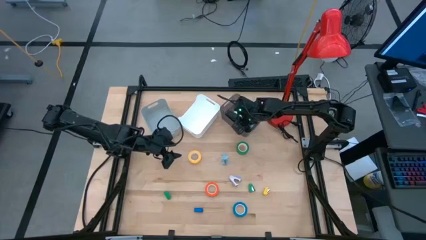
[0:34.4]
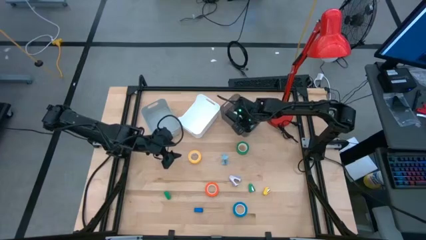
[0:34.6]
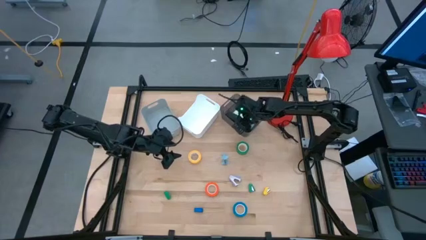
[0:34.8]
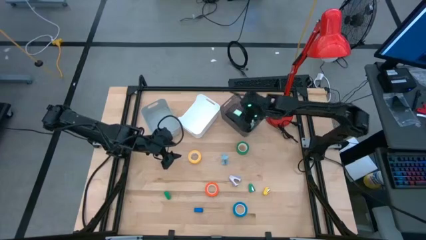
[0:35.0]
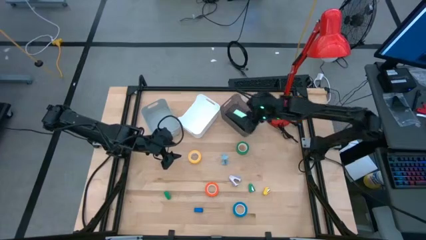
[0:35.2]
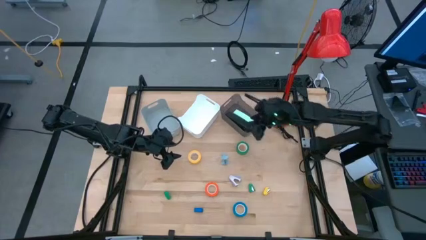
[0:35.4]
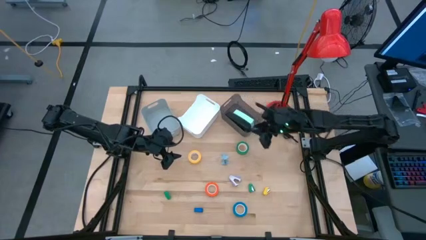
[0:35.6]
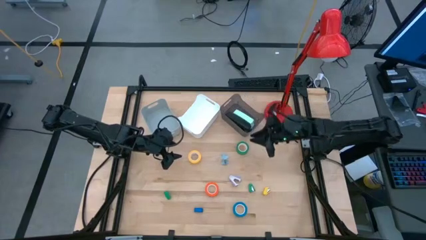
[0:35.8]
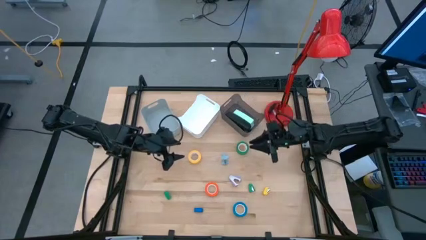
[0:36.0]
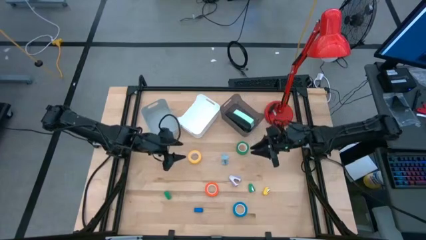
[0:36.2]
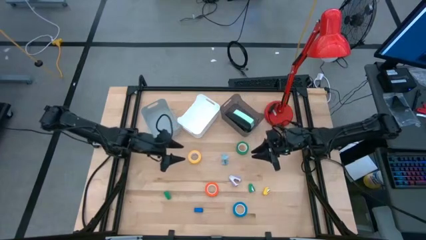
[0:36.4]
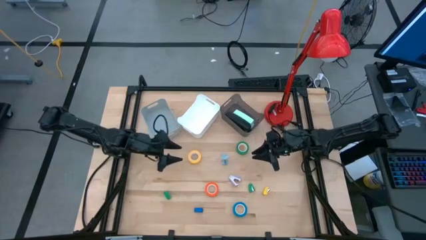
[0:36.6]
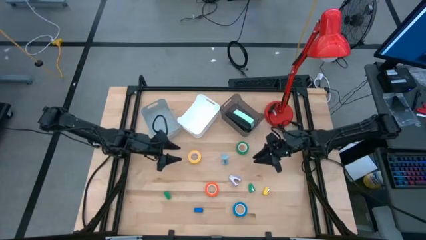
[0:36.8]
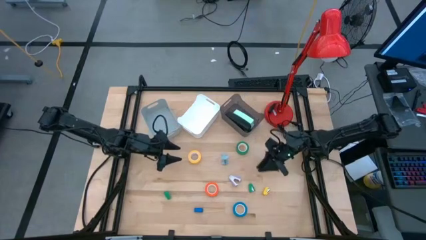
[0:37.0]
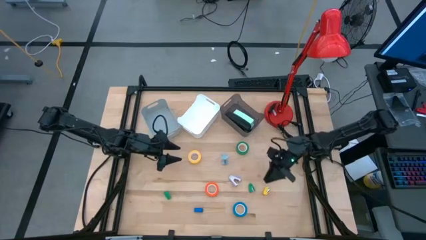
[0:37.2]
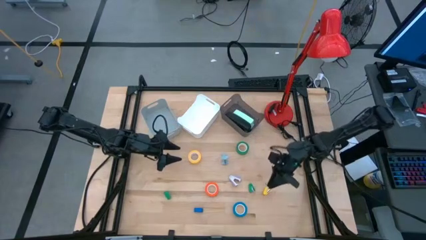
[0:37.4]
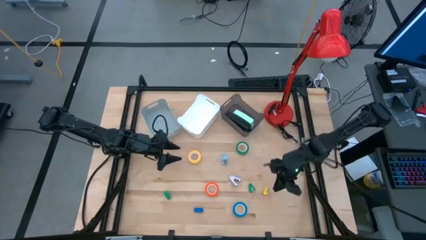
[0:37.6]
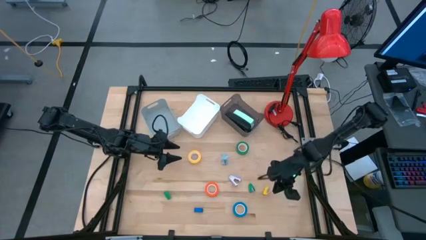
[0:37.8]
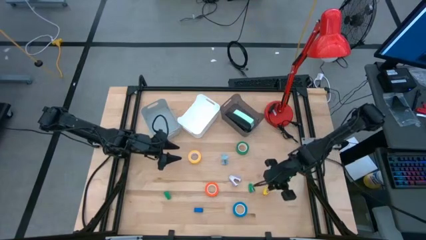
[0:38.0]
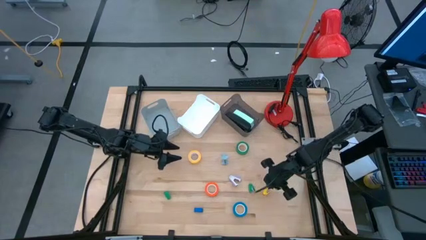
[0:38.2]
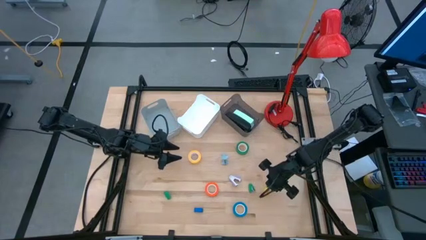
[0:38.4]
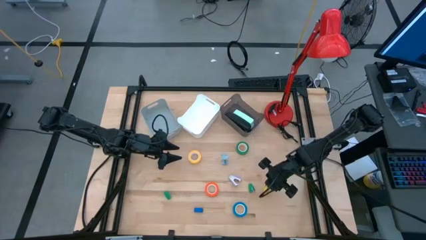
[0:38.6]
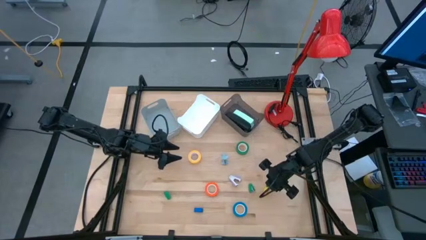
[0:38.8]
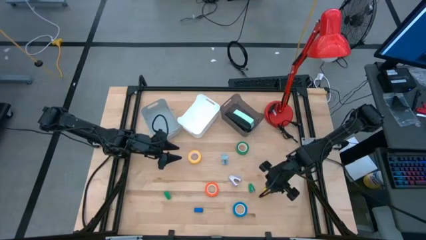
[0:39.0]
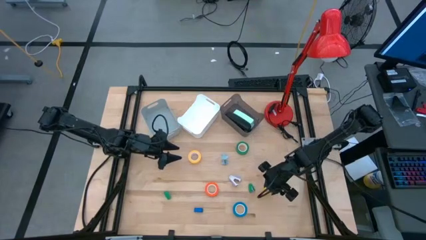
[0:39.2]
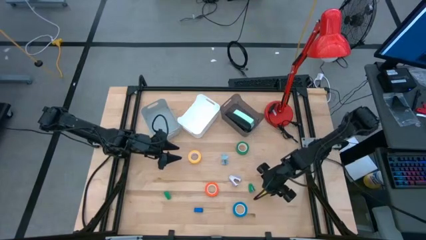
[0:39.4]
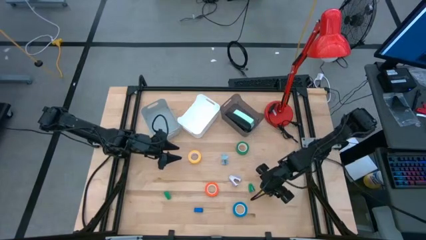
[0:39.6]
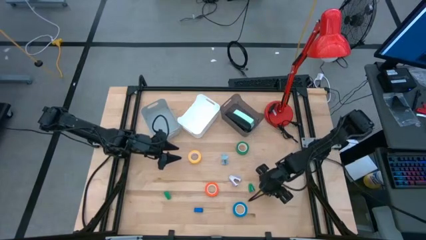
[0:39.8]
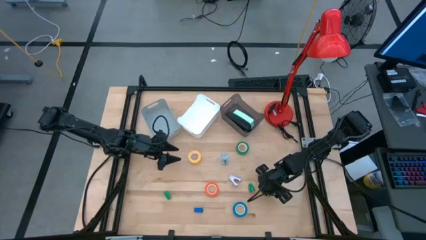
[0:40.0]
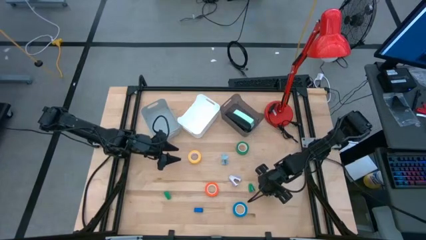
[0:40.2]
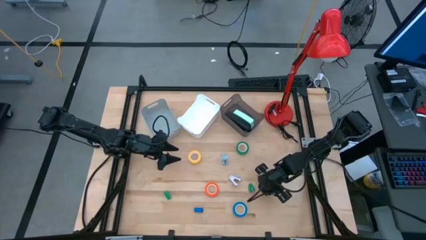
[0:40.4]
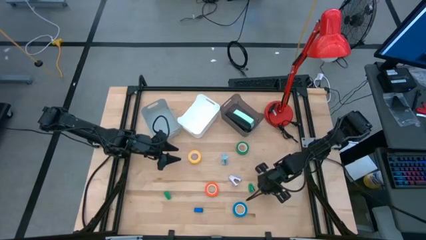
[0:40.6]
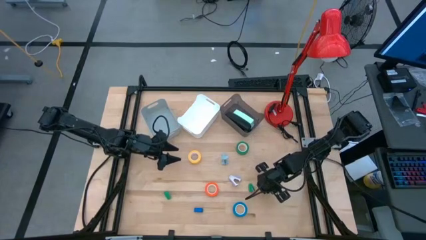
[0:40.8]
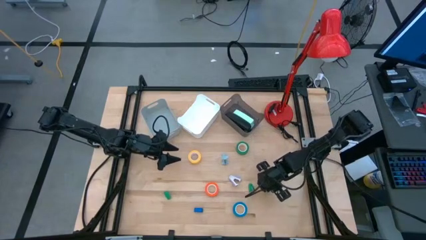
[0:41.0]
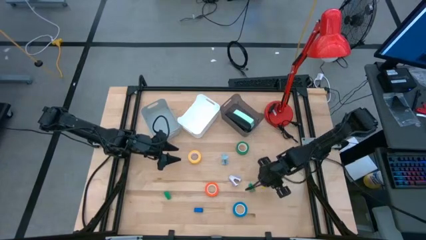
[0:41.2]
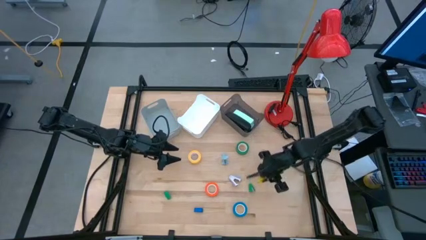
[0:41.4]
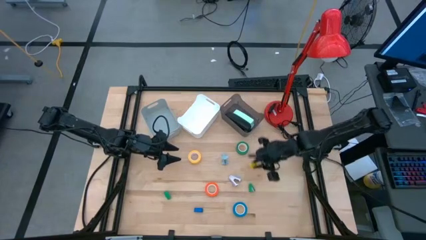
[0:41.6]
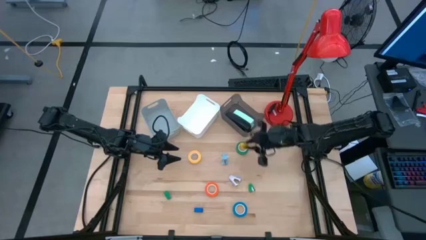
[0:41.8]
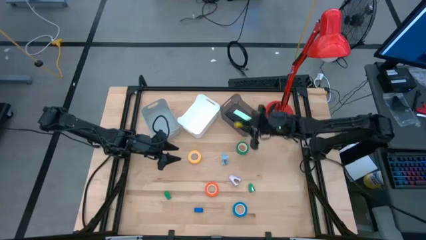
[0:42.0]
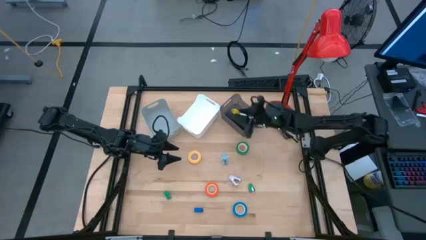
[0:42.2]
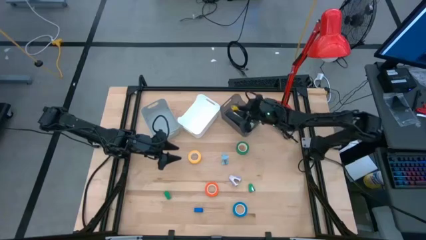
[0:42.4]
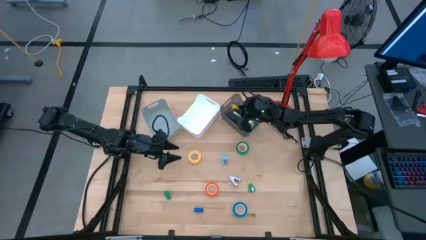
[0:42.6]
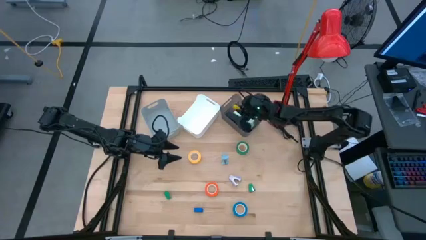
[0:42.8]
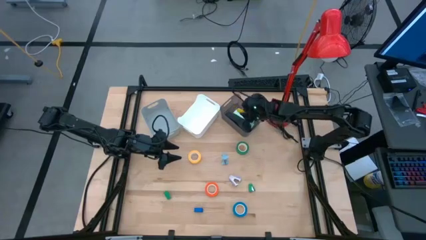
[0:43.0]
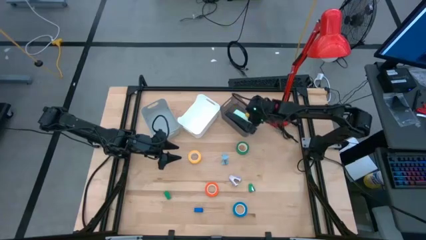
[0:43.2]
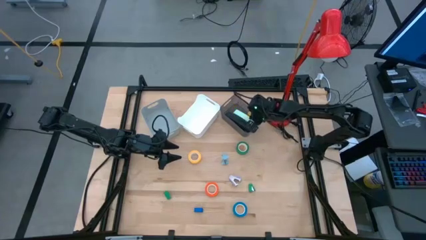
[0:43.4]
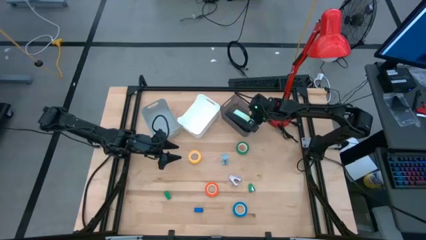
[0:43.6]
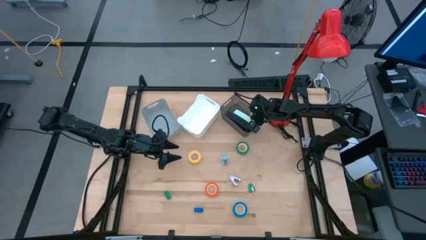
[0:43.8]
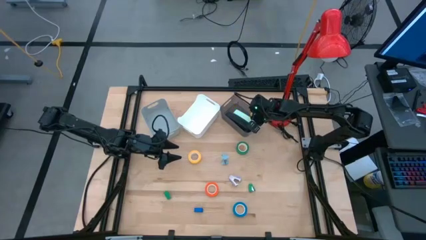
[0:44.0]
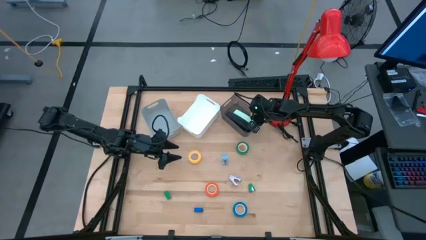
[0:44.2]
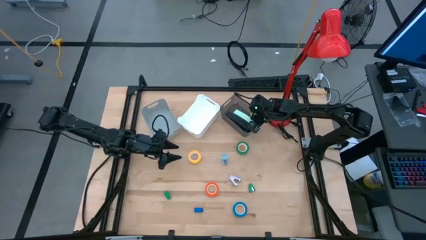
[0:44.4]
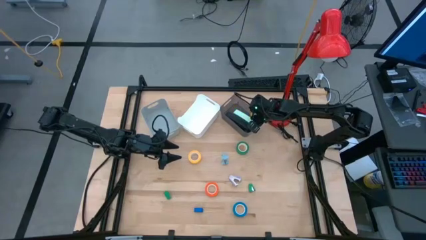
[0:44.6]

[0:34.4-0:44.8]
Task: Pick and place Stapler, Stapler remover, tape
Put the small yellow stapler into the black bin

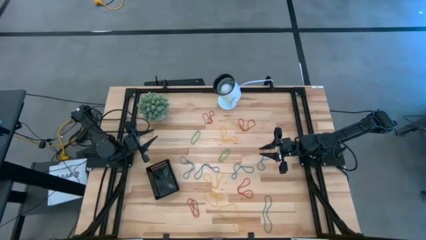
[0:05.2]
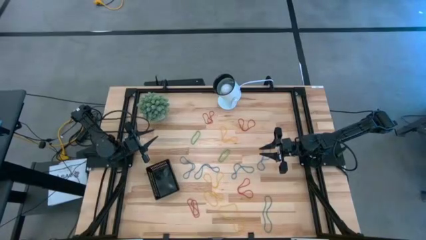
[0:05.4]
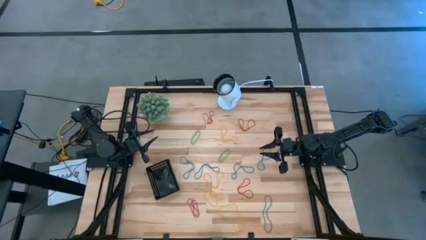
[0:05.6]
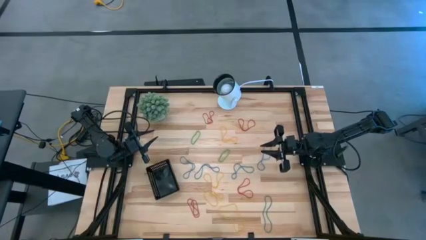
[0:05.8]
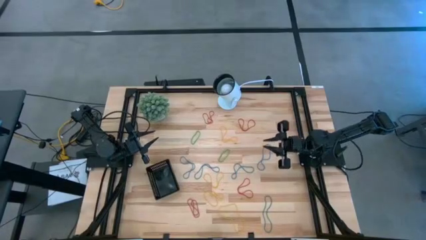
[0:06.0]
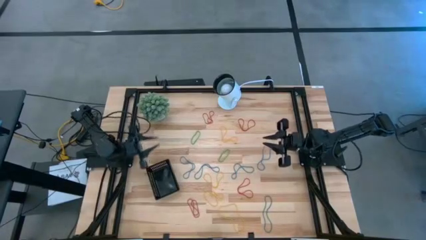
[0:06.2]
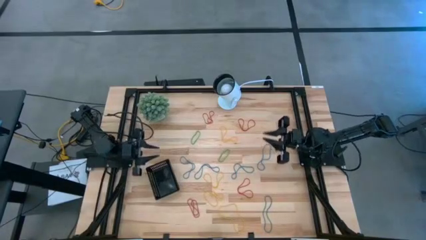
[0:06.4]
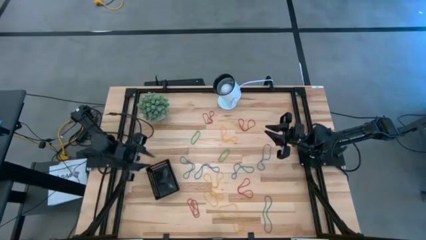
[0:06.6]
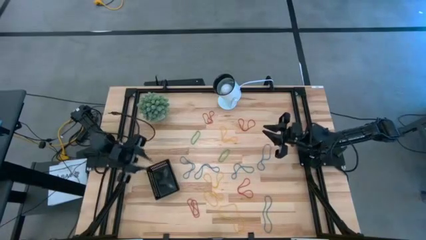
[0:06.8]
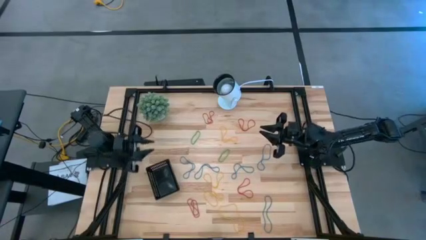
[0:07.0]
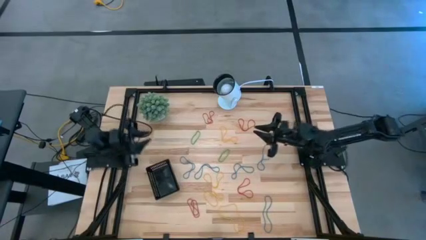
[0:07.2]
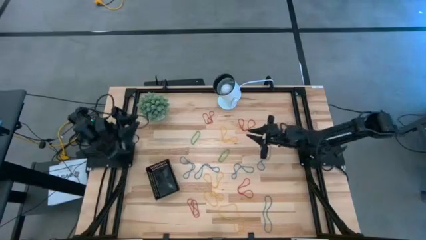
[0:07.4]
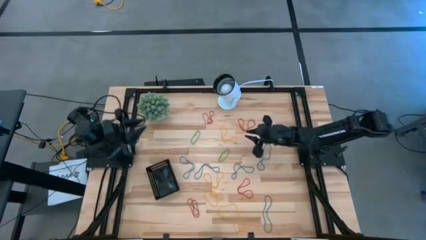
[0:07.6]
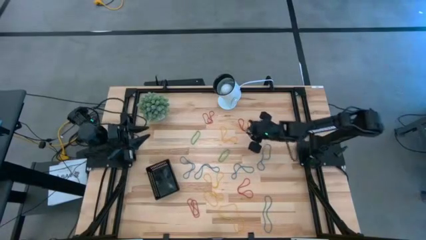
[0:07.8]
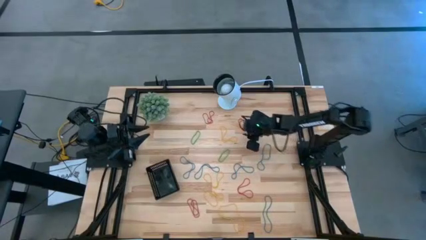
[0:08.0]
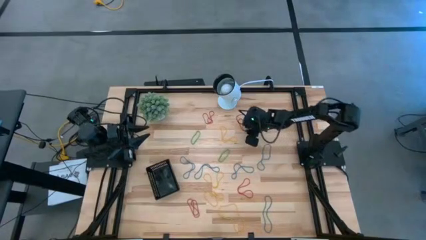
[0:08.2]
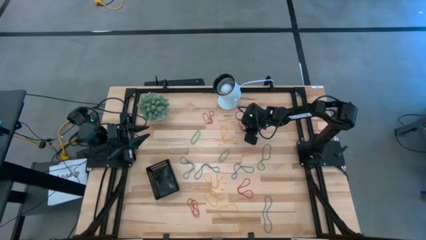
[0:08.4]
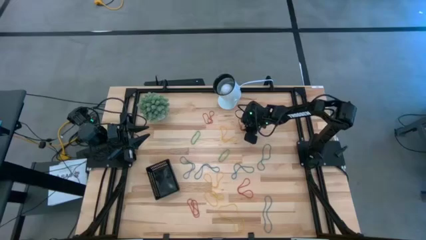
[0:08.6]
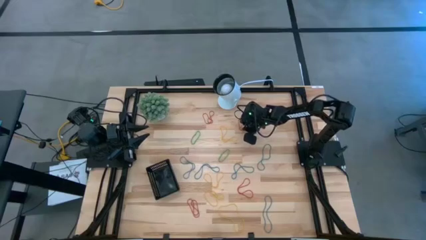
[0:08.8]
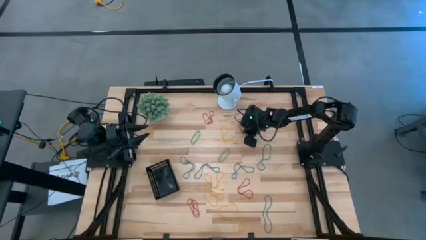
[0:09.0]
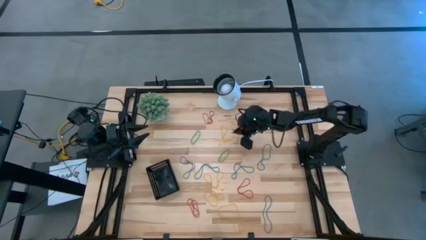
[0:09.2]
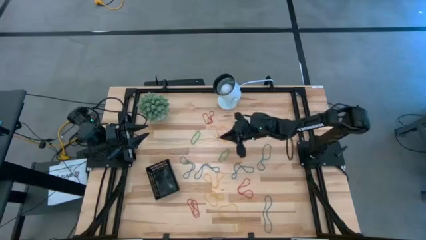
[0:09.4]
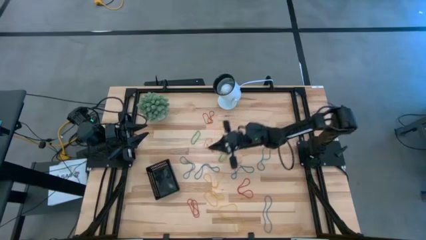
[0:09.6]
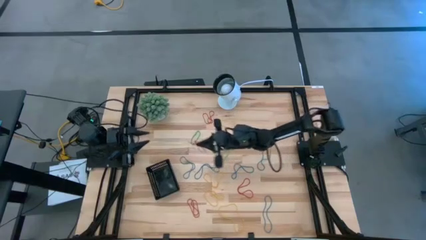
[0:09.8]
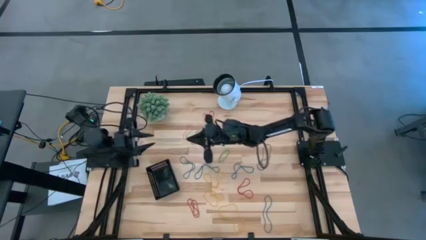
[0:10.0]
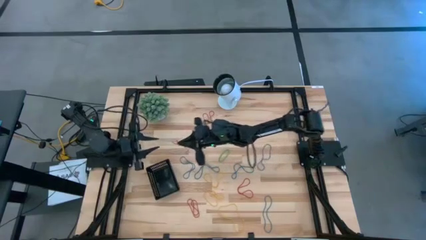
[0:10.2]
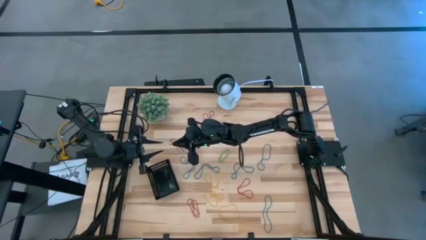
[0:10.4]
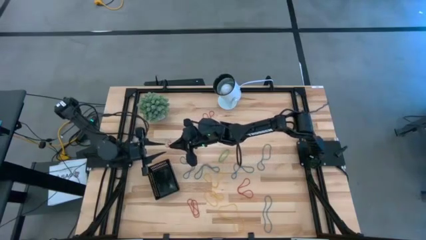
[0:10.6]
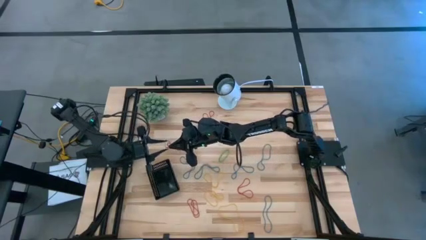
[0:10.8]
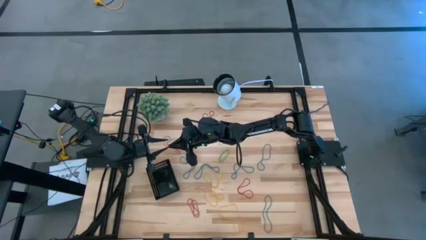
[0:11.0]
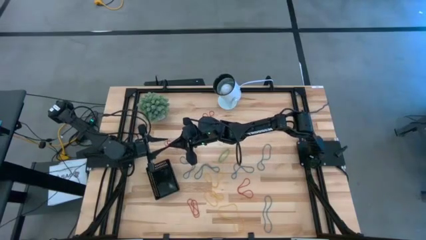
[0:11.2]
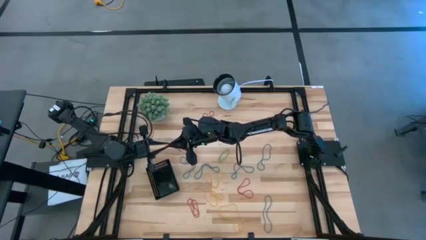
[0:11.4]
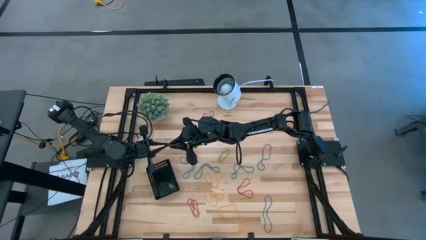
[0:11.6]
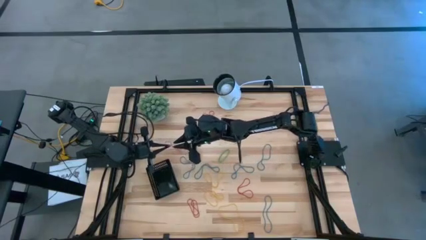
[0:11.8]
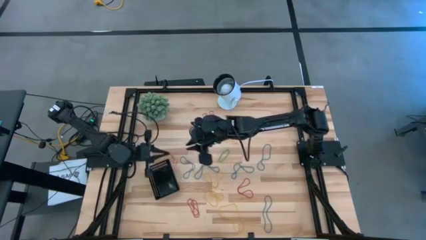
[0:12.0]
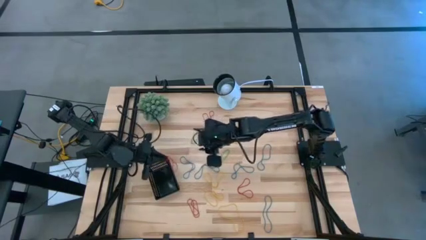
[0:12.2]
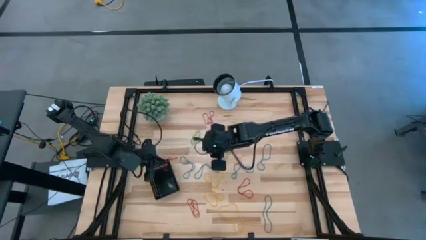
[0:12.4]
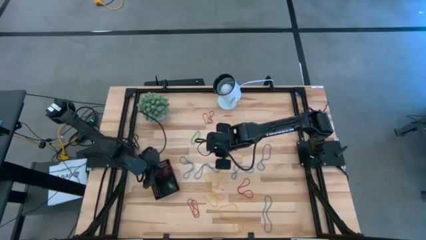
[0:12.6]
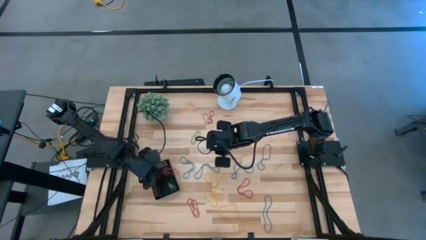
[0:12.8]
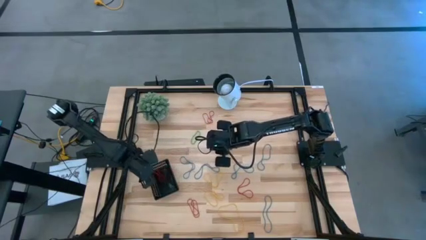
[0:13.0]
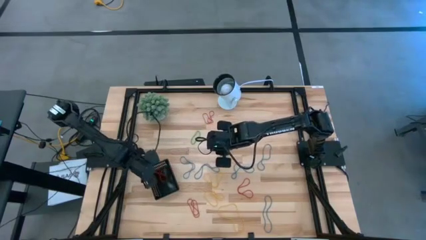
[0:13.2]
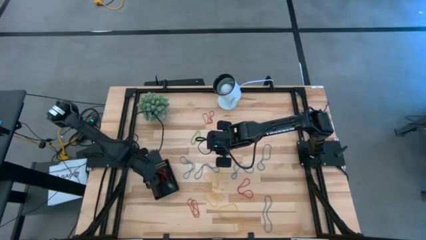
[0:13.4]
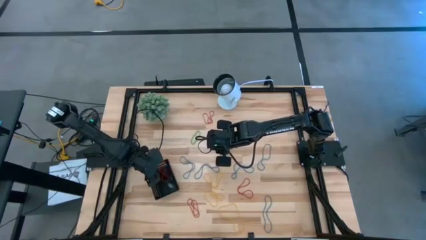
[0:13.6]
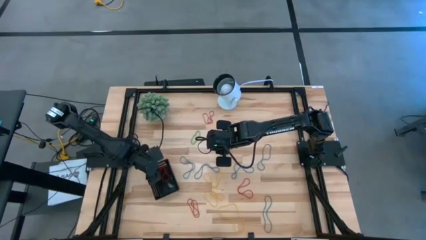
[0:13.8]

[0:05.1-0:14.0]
Task: Pick and place items into bin
Put the red rubber band into the black bin
